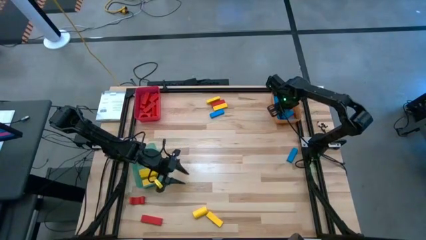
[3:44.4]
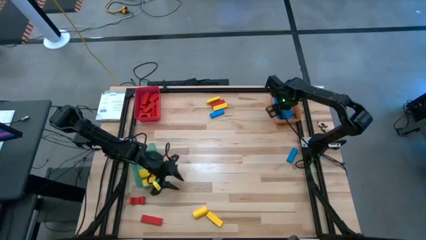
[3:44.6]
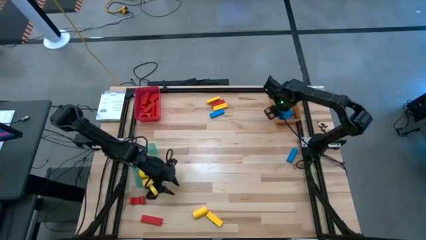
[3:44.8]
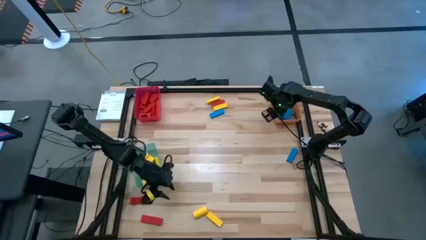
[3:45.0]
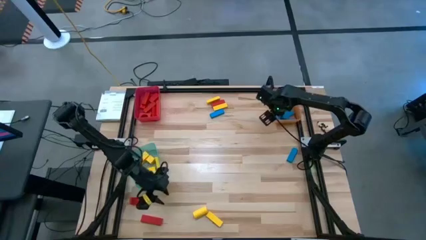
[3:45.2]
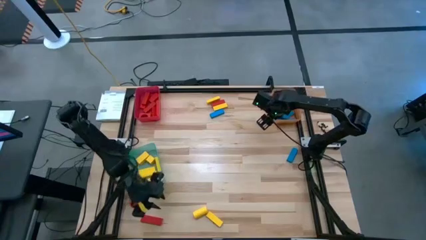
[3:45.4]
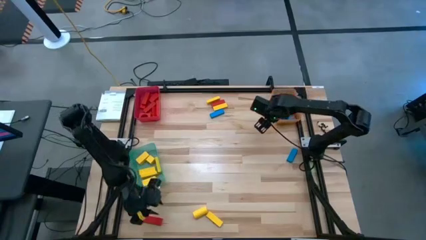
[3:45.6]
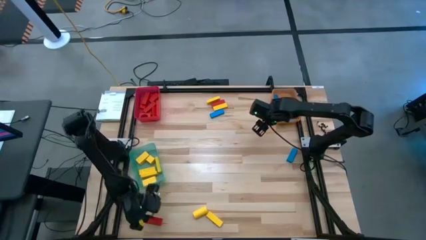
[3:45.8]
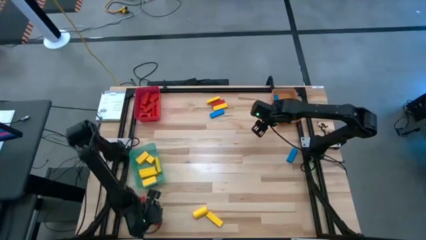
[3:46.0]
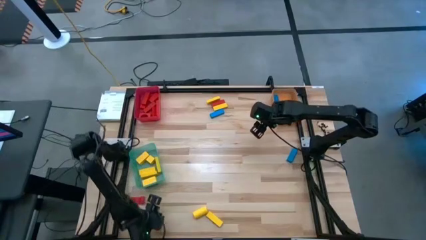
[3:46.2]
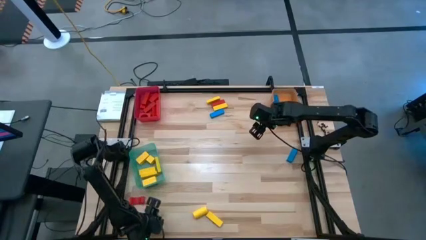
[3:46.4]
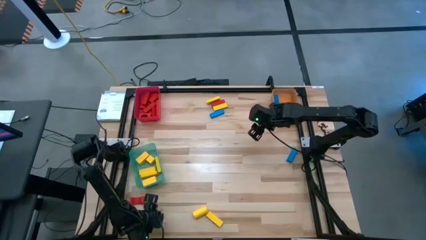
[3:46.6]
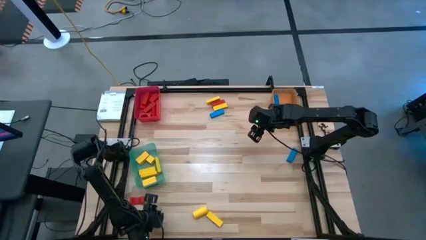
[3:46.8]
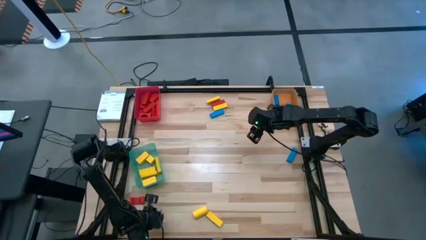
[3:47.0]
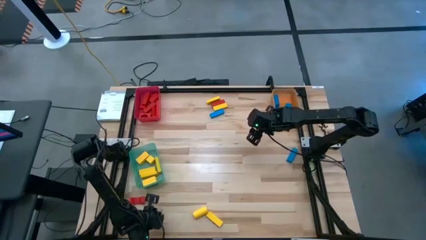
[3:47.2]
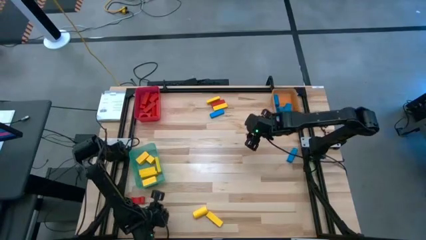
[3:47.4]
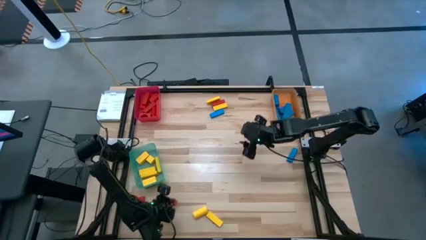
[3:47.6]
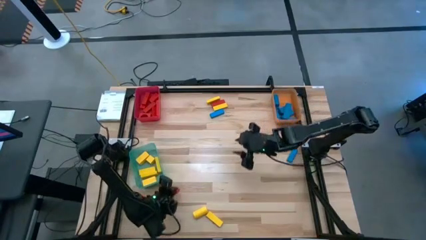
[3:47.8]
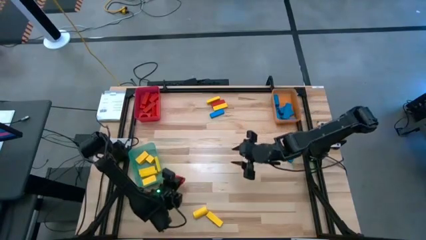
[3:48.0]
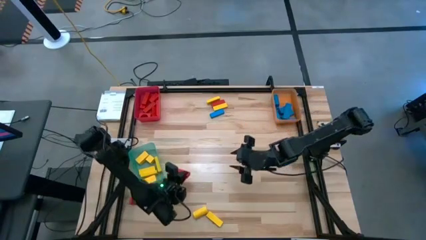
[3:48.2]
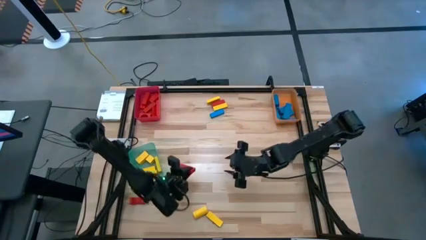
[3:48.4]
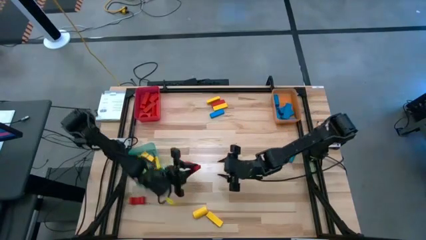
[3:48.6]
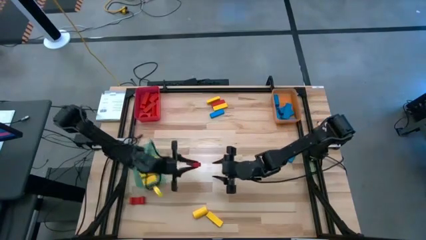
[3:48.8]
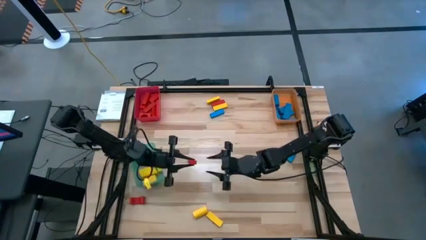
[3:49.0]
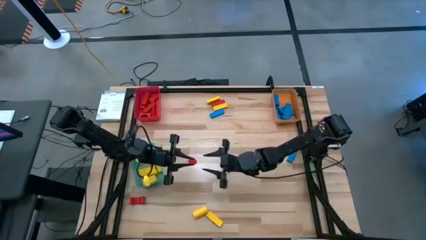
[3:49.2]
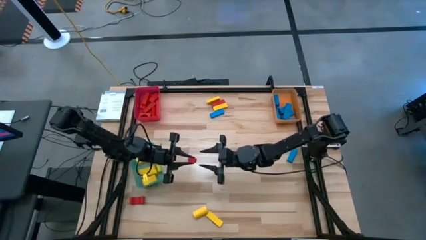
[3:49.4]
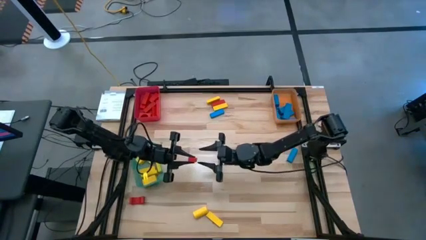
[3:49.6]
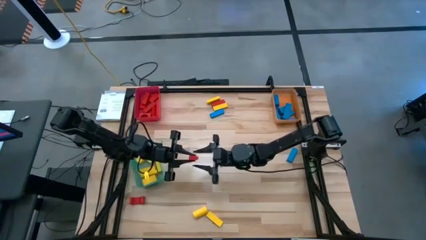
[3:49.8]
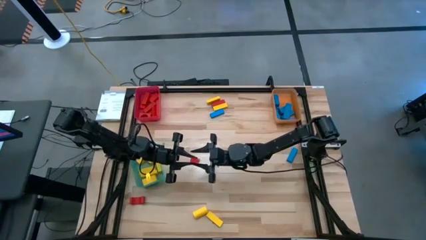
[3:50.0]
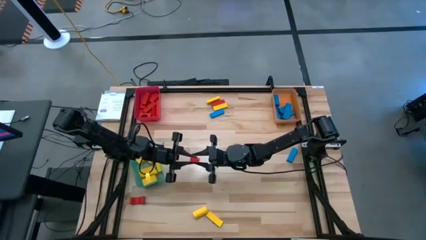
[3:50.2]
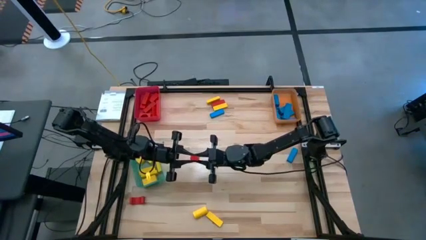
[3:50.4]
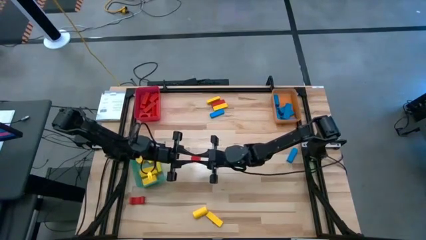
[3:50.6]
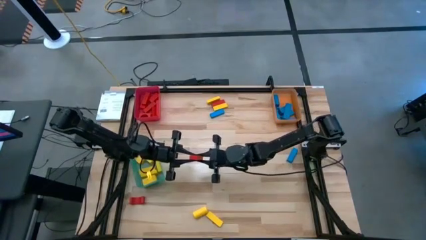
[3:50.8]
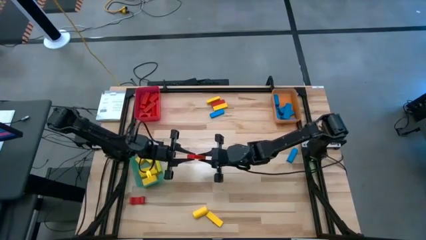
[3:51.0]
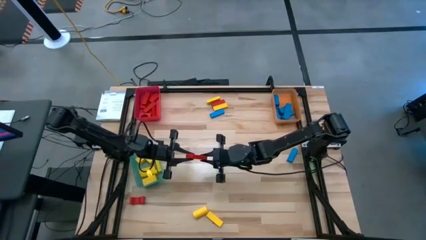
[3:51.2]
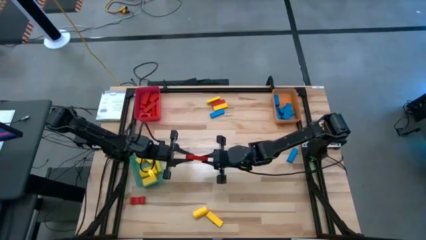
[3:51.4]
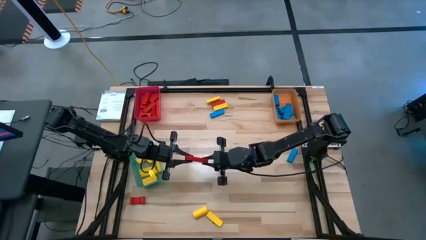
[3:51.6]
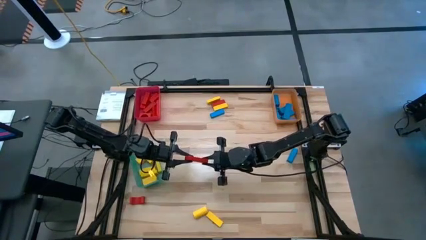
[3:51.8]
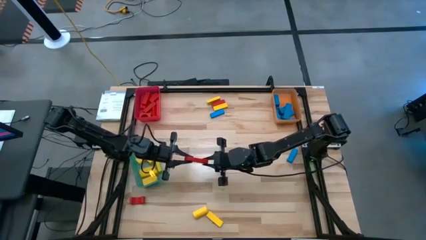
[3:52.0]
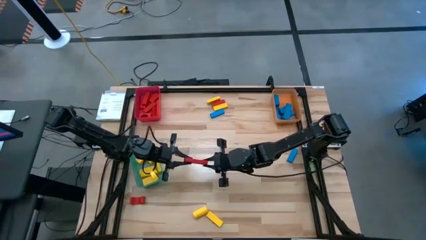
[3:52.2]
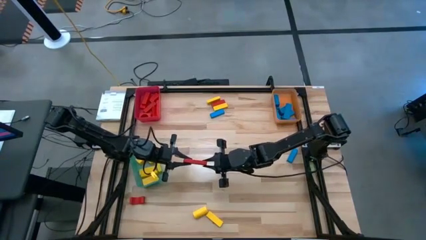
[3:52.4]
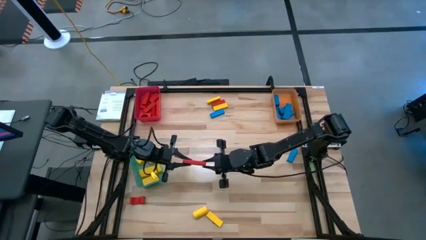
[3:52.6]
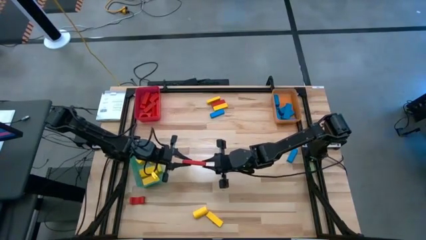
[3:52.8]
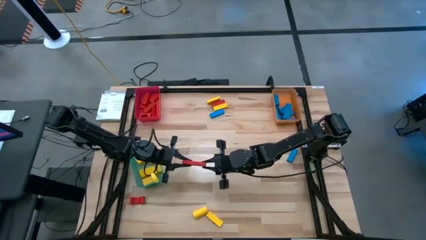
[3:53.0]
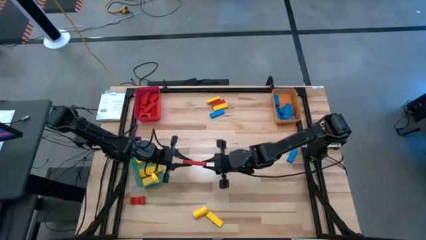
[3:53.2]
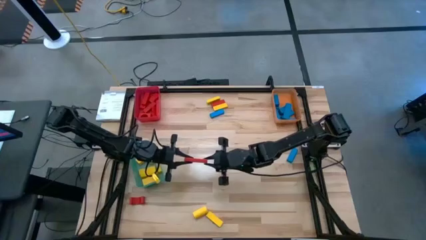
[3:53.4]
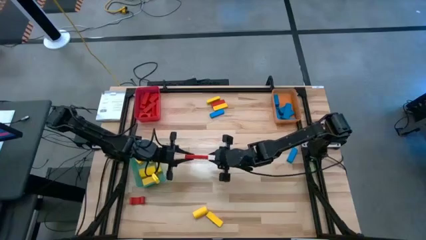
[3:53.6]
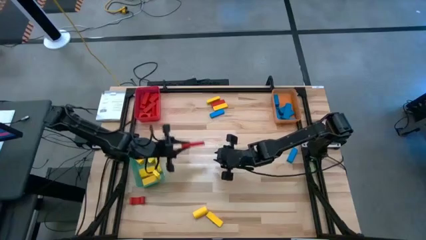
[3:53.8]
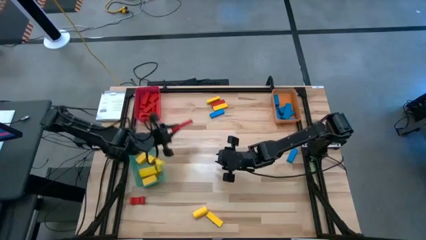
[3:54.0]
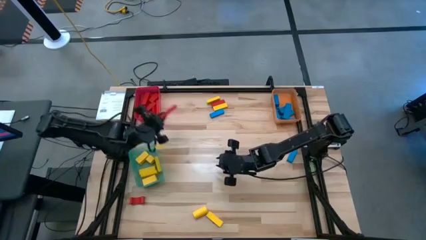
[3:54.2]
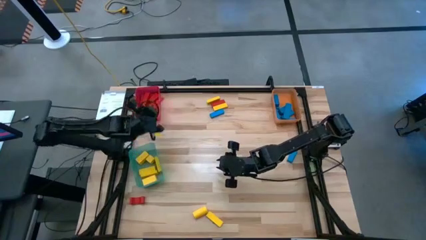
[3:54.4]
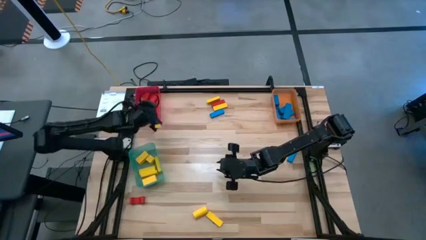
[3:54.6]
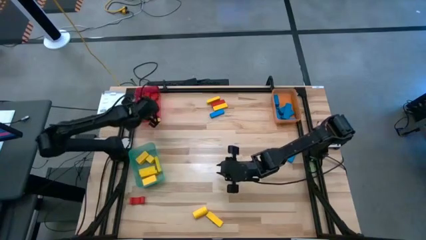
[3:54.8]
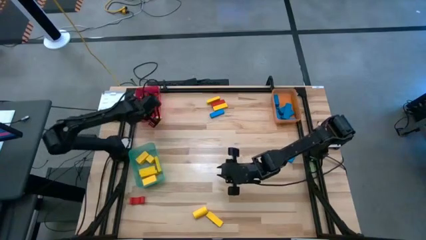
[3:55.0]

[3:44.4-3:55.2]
Task: Sort blocks
Put the red block into the red bin

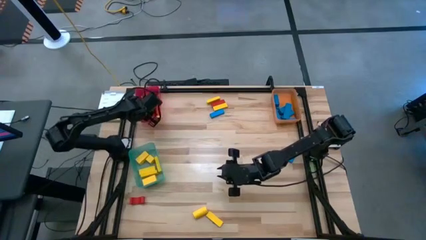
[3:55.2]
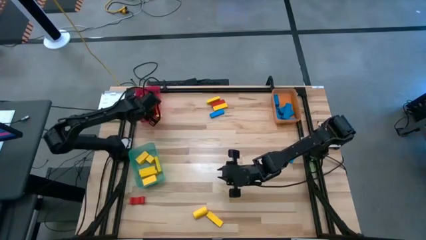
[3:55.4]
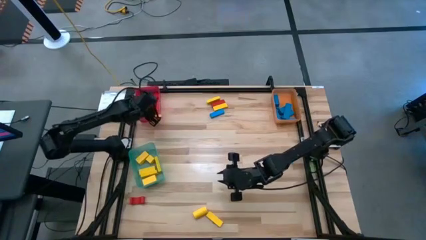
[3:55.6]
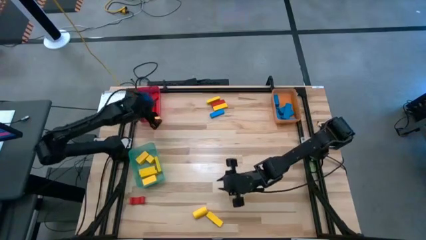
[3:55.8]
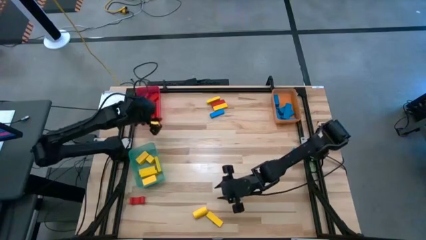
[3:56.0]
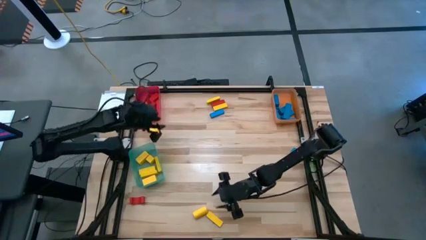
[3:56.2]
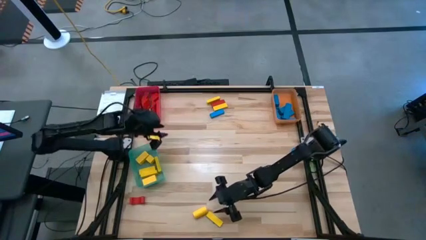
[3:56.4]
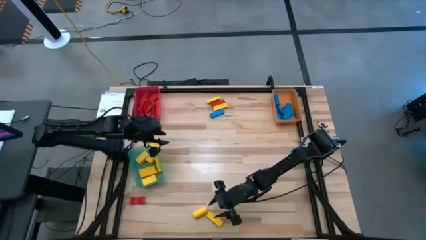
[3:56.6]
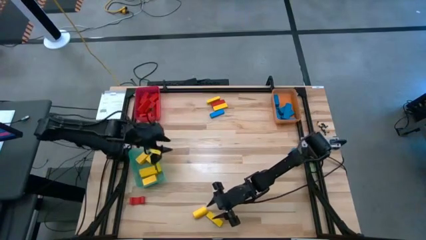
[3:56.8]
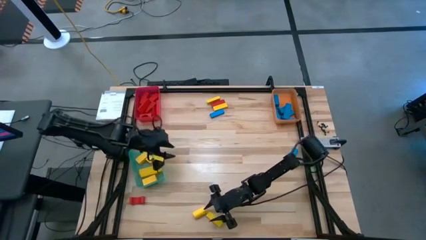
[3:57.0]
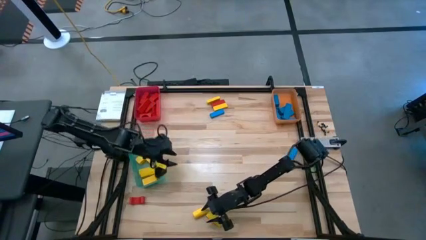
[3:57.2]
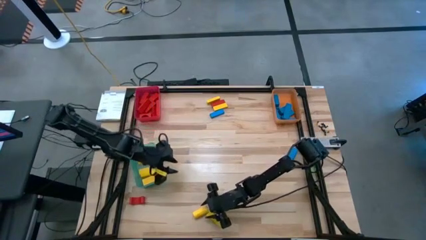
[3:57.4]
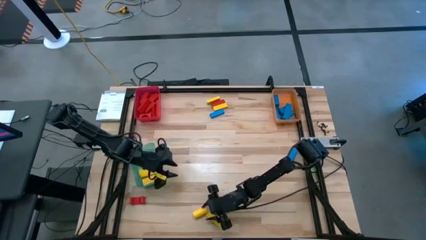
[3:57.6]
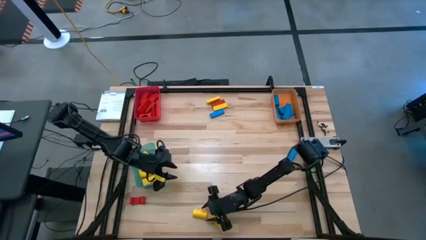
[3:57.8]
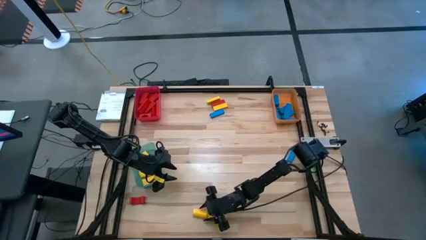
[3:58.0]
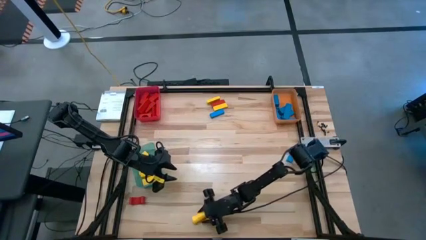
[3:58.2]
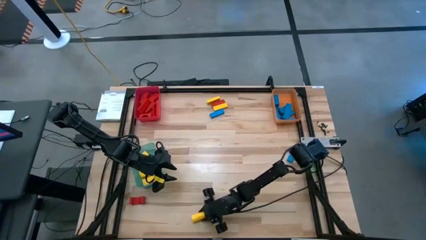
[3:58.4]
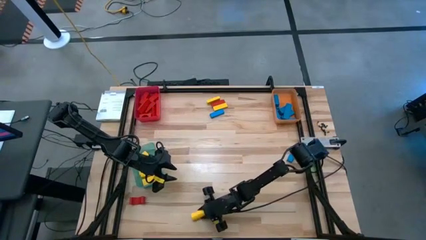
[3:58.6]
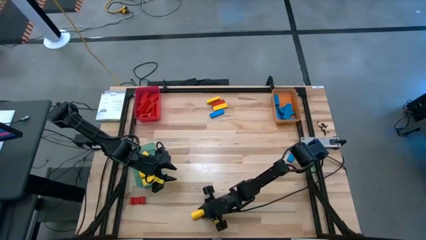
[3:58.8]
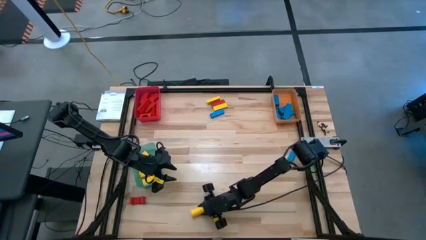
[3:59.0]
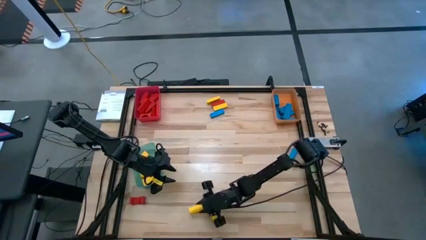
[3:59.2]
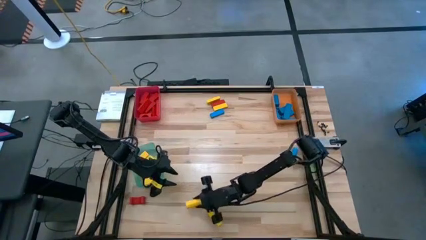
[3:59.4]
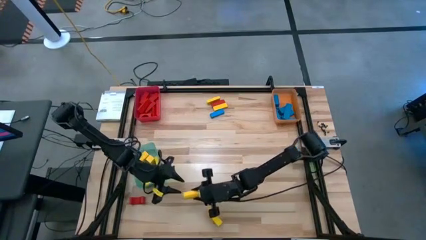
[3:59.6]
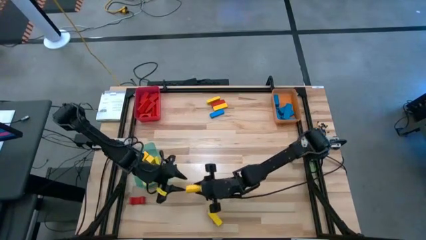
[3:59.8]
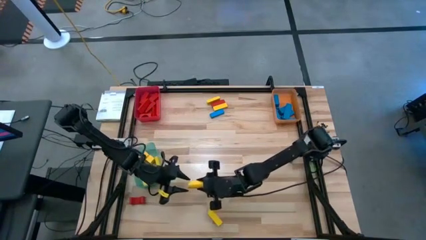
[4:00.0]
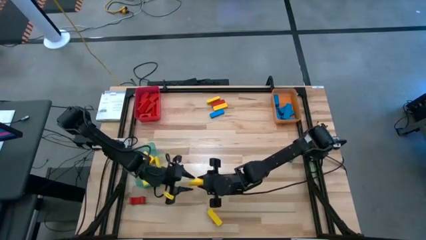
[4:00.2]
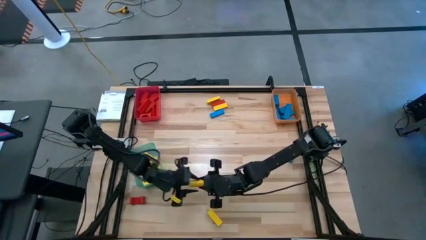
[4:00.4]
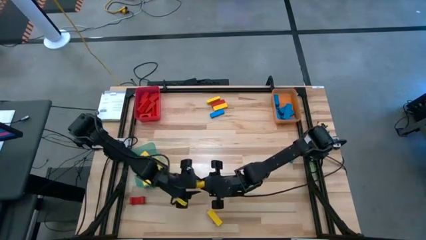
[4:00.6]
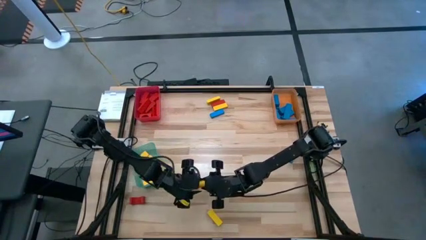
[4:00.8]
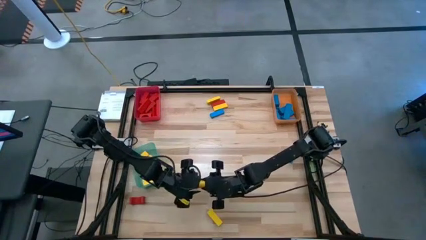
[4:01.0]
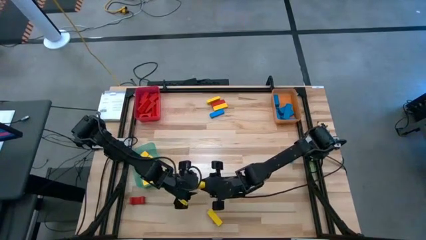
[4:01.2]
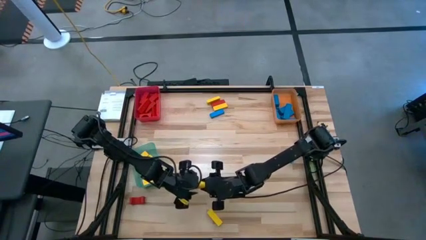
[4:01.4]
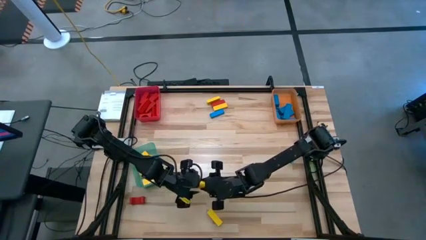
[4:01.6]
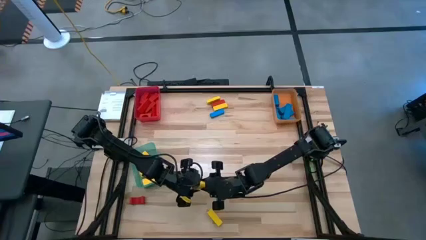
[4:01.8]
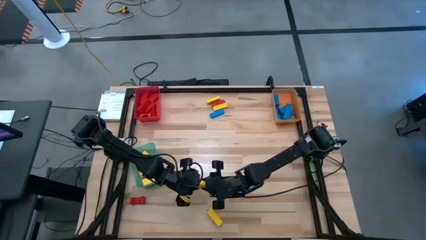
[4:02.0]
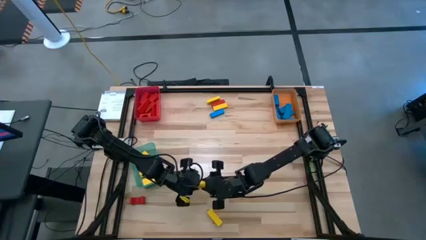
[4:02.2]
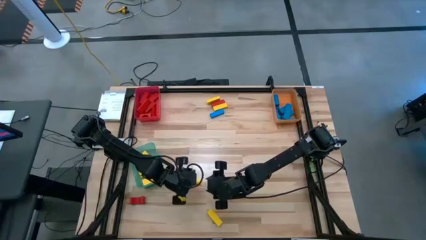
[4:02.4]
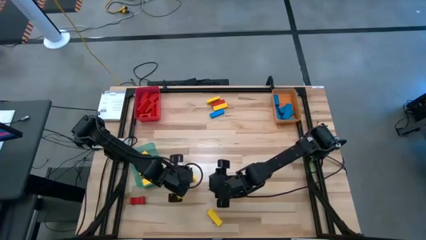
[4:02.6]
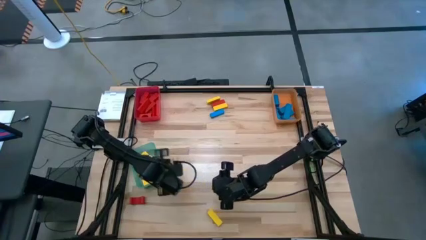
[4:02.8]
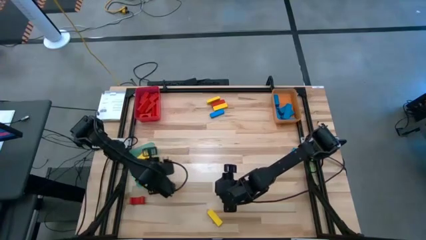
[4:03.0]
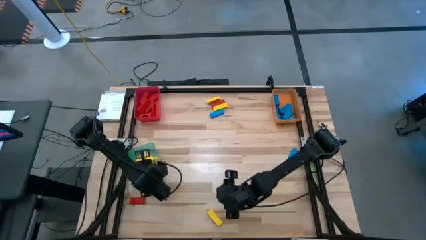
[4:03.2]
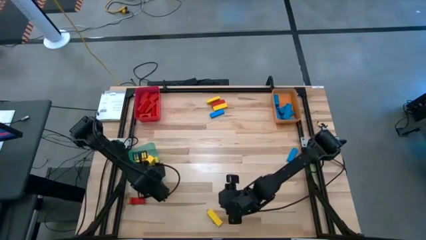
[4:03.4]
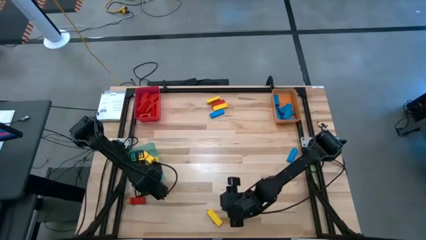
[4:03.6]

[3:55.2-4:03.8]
Put the yellow block into the green bin
